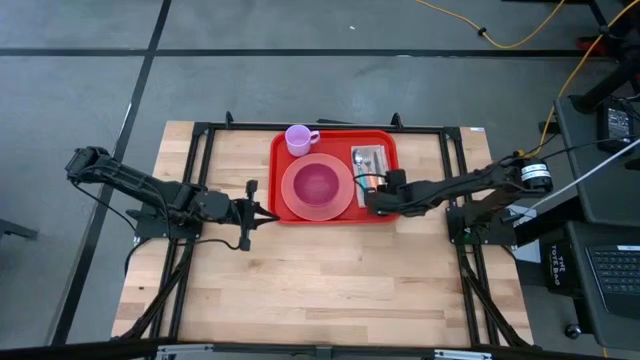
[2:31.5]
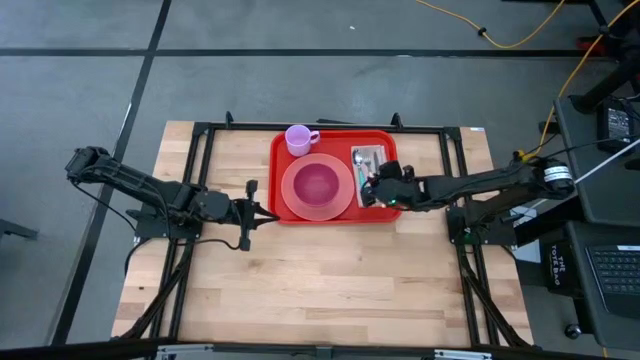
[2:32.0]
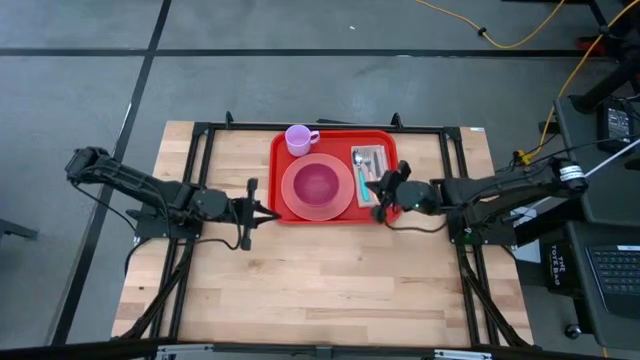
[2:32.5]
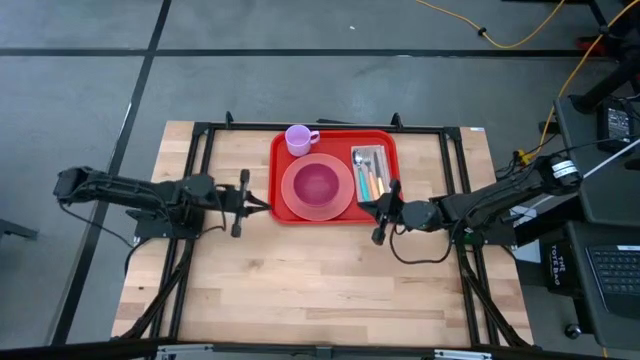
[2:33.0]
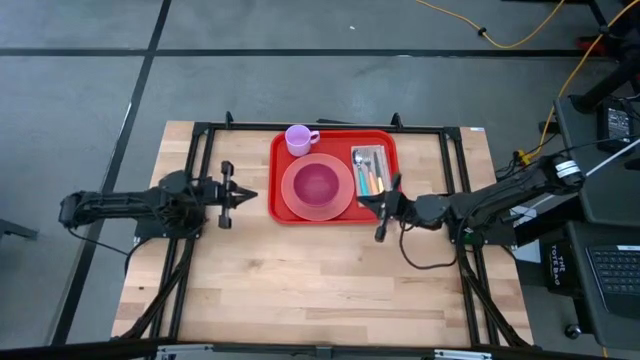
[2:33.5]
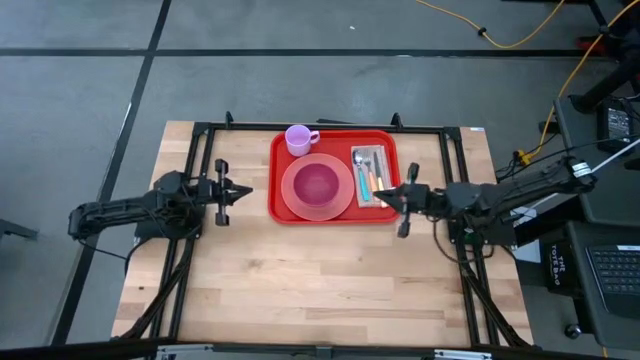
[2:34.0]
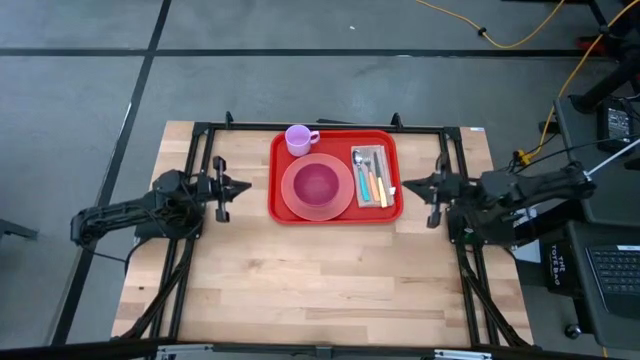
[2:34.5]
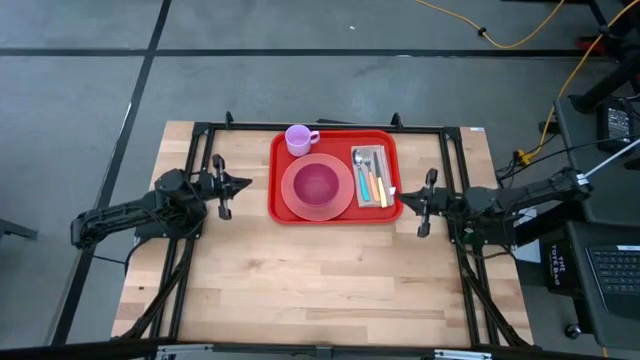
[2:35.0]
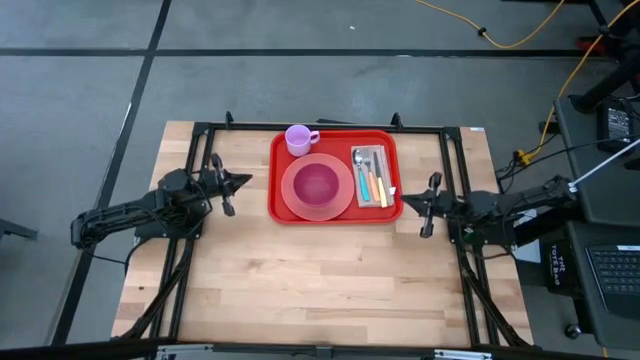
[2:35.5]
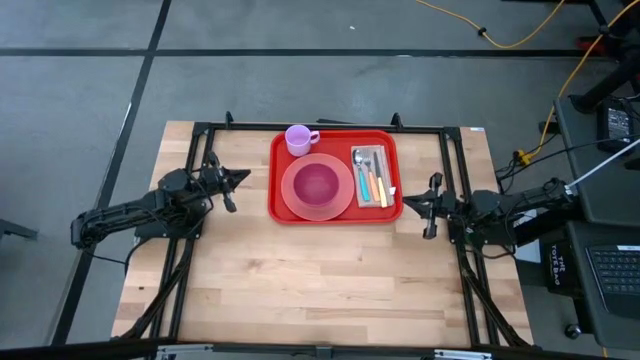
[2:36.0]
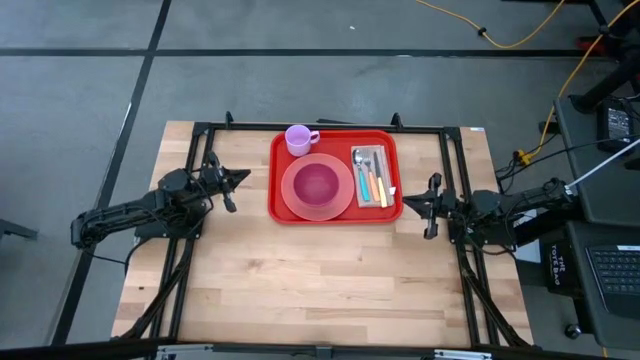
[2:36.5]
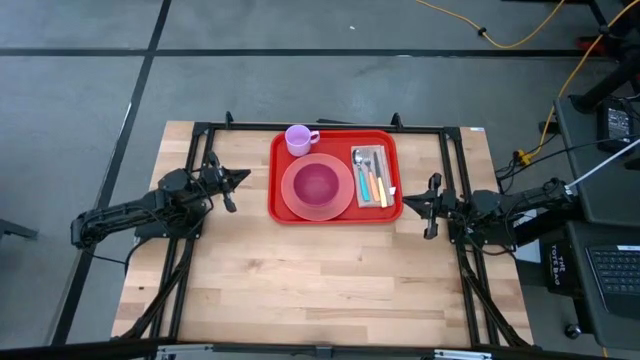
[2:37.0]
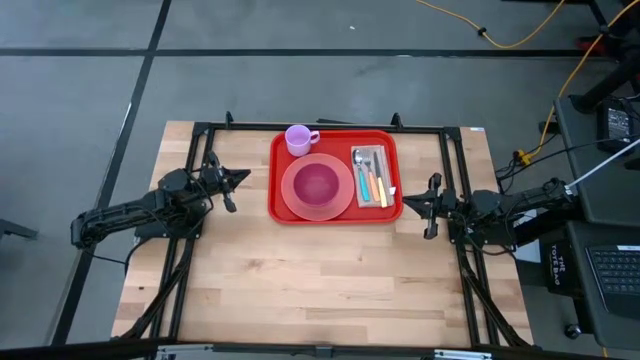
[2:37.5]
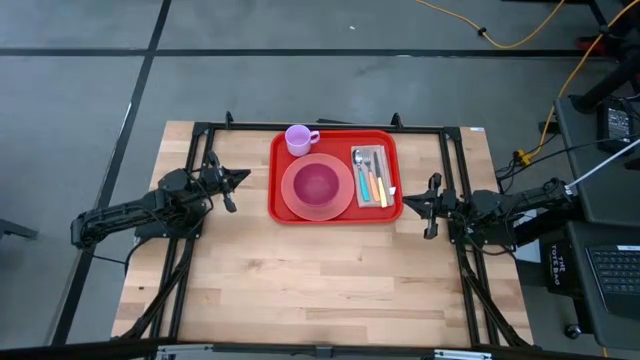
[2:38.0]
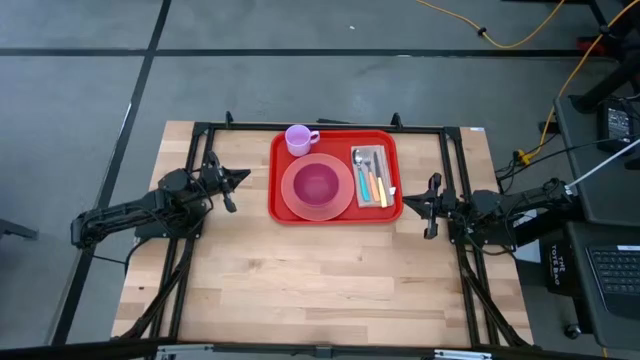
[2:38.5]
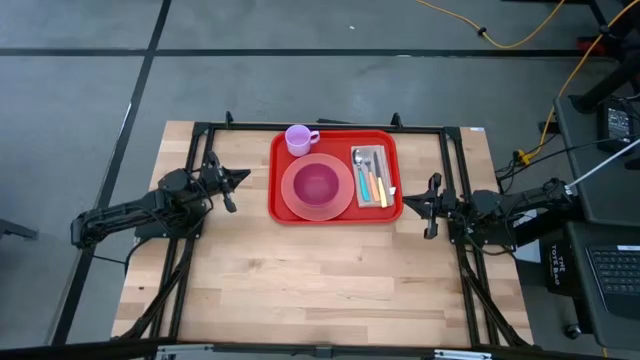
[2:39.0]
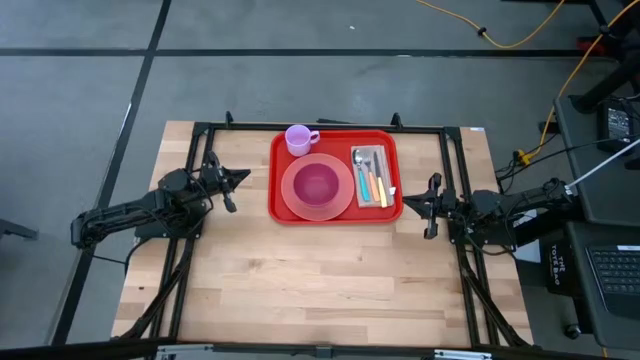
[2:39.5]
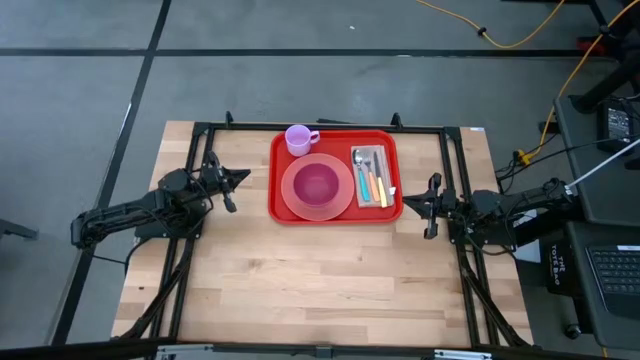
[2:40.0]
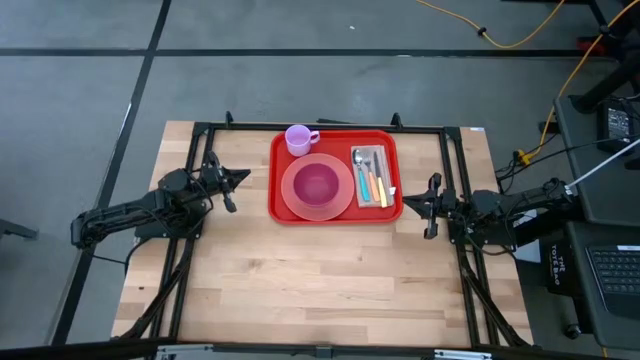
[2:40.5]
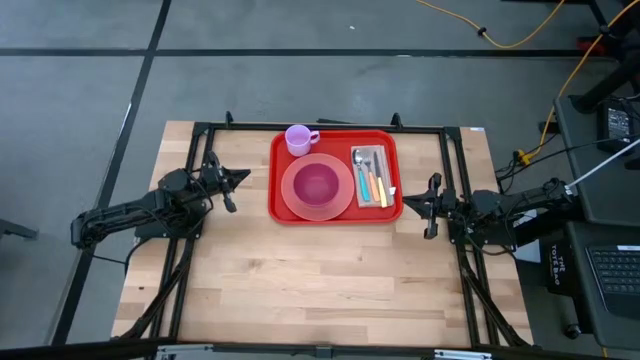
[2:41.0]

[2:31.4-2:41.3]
Task: Set up tray
Return to Home Position

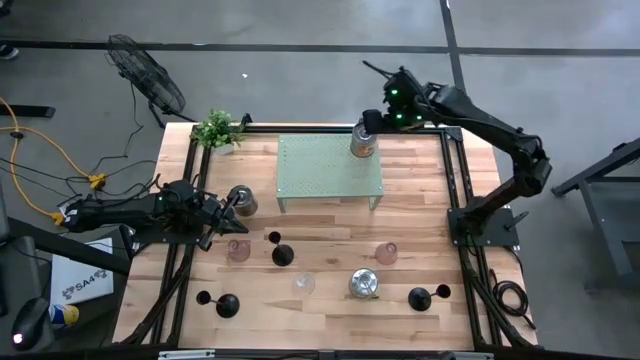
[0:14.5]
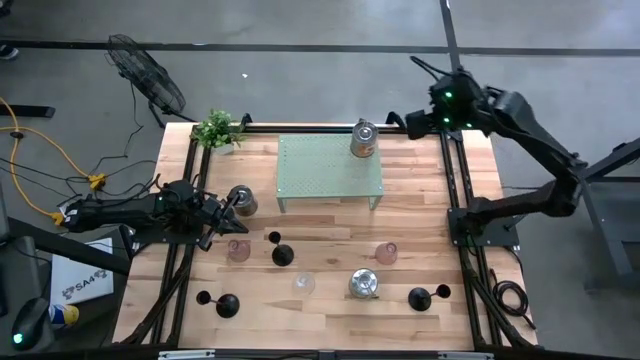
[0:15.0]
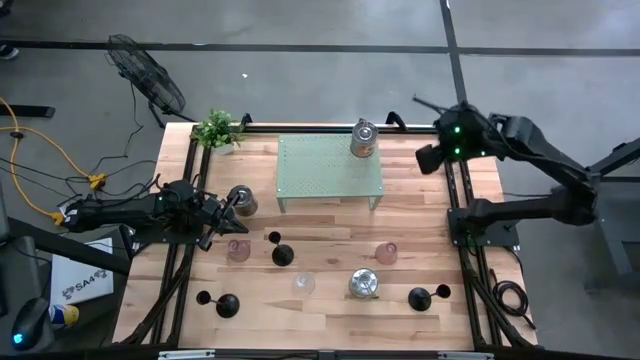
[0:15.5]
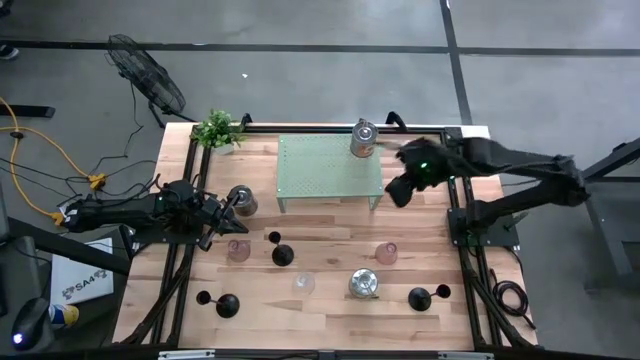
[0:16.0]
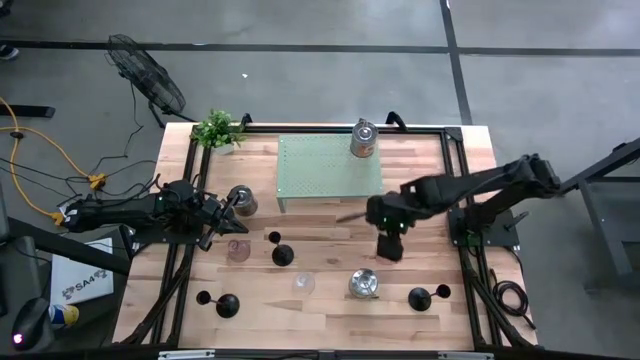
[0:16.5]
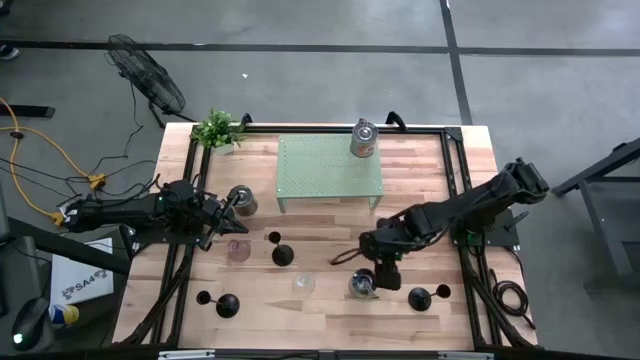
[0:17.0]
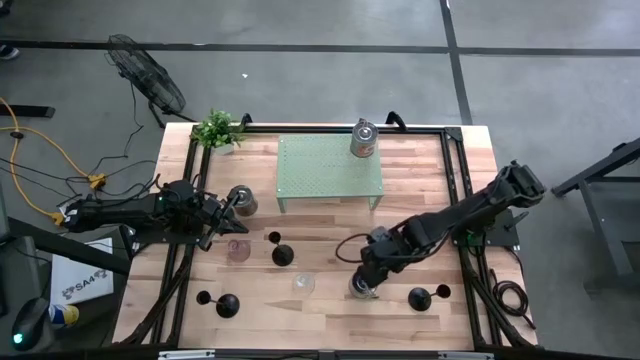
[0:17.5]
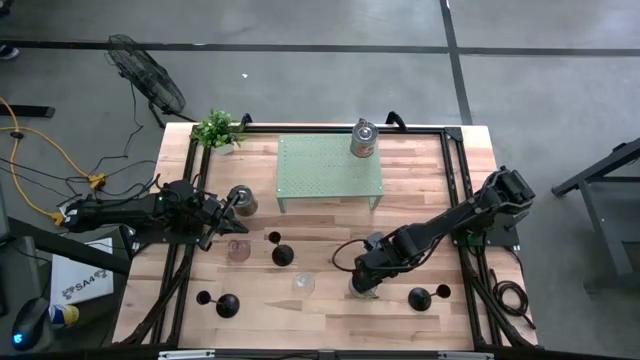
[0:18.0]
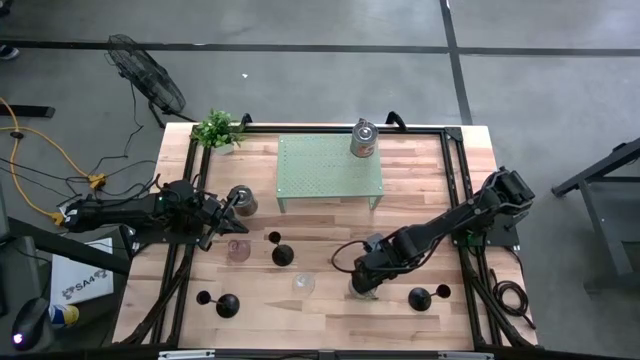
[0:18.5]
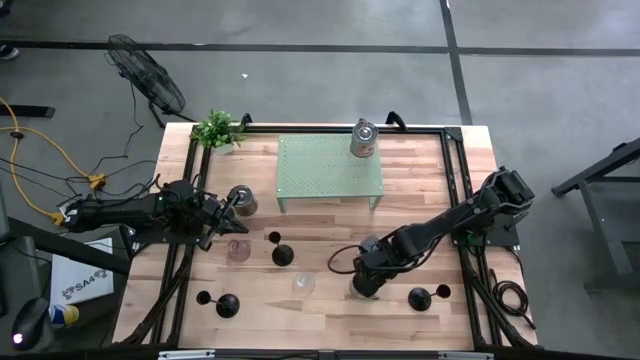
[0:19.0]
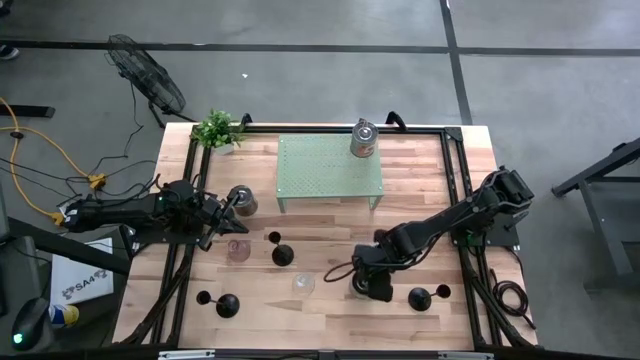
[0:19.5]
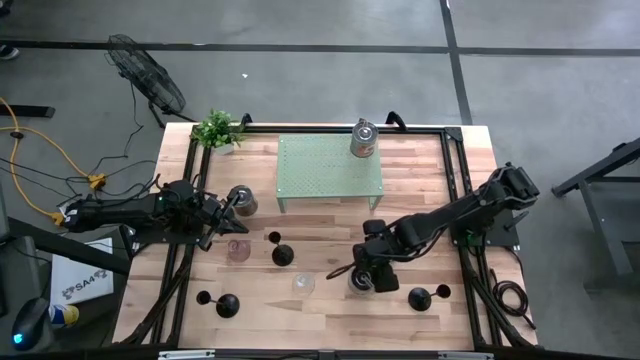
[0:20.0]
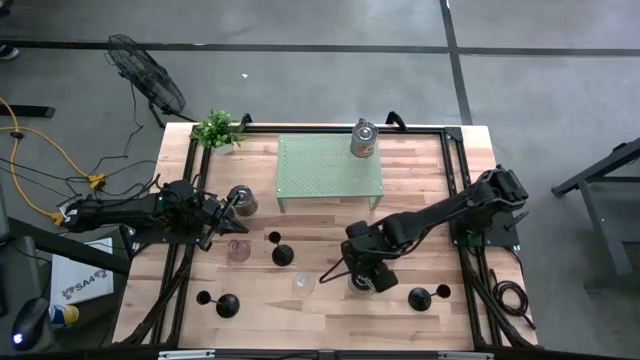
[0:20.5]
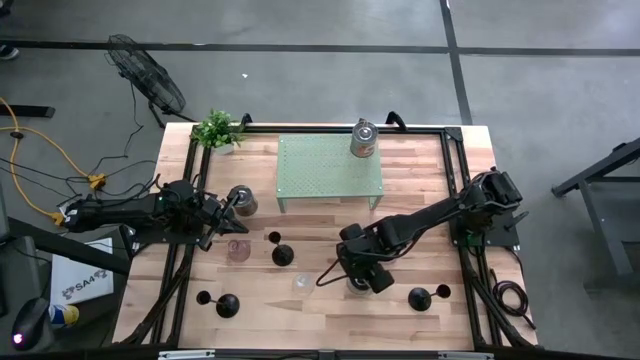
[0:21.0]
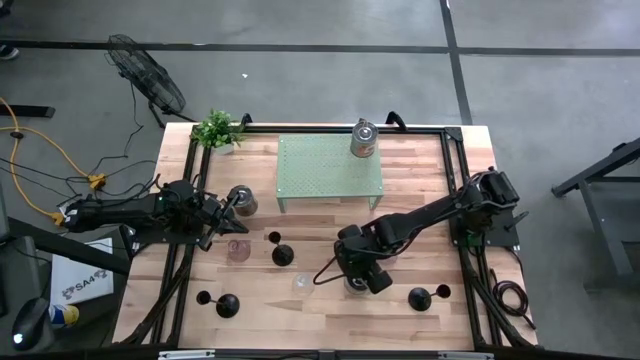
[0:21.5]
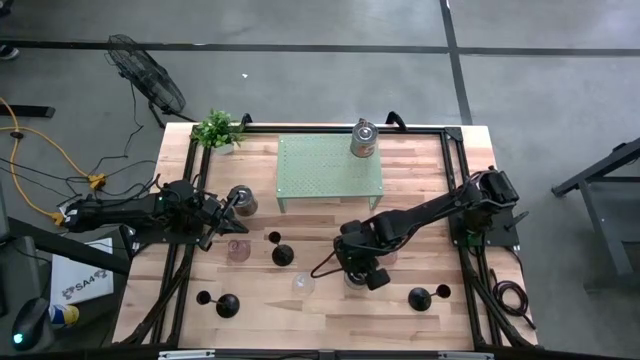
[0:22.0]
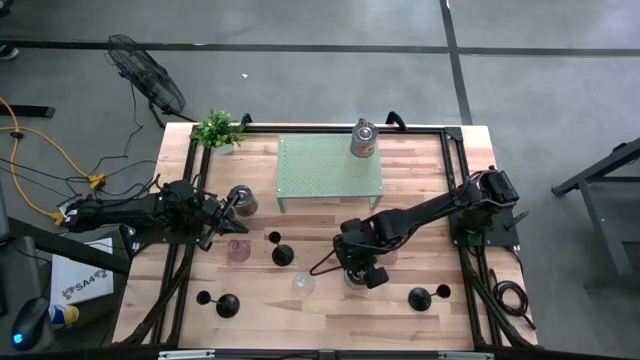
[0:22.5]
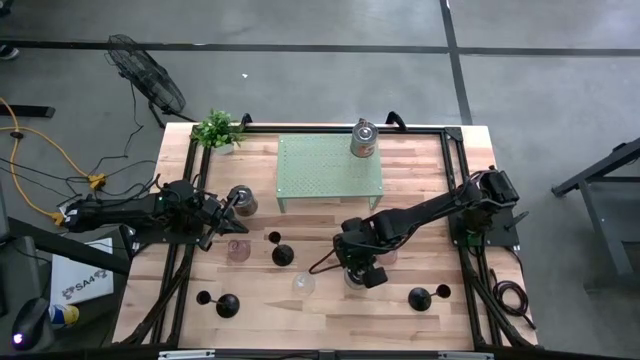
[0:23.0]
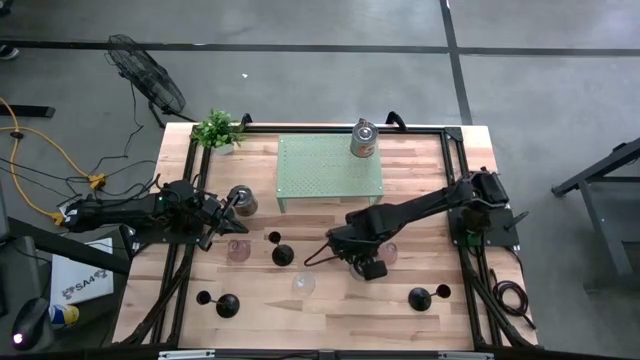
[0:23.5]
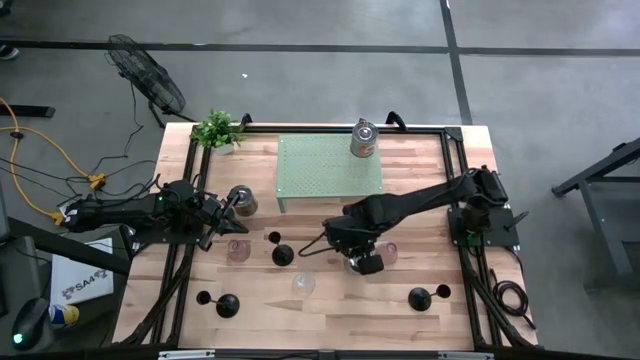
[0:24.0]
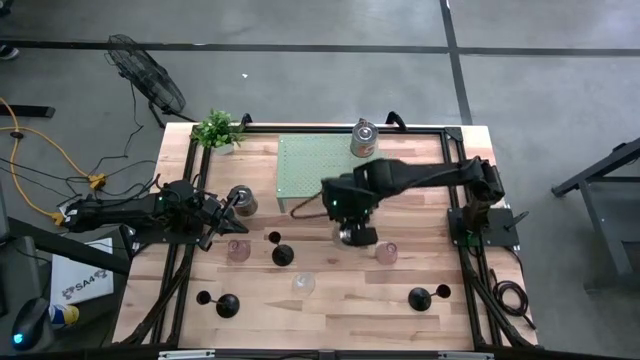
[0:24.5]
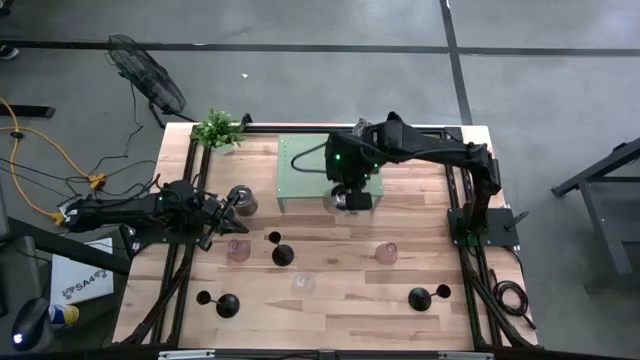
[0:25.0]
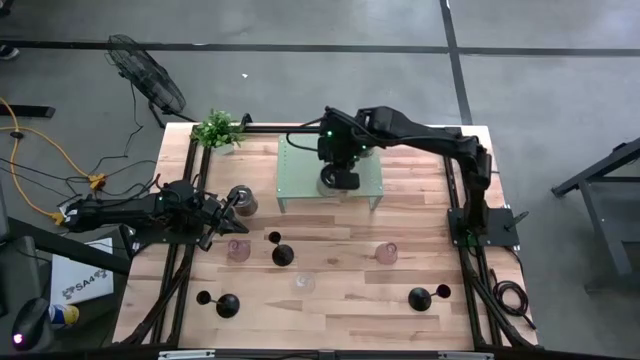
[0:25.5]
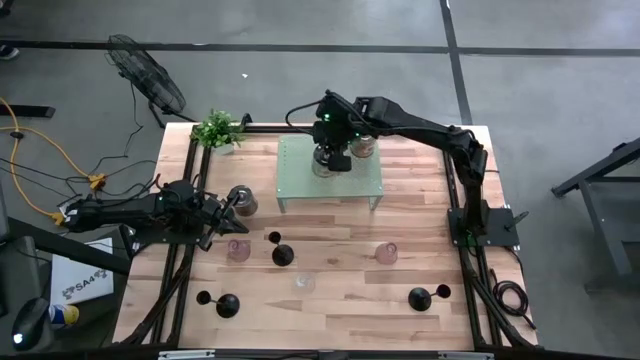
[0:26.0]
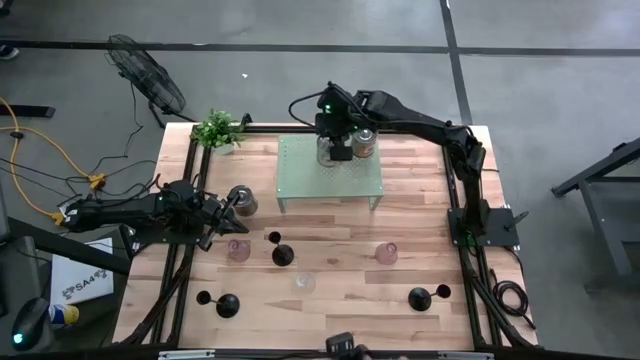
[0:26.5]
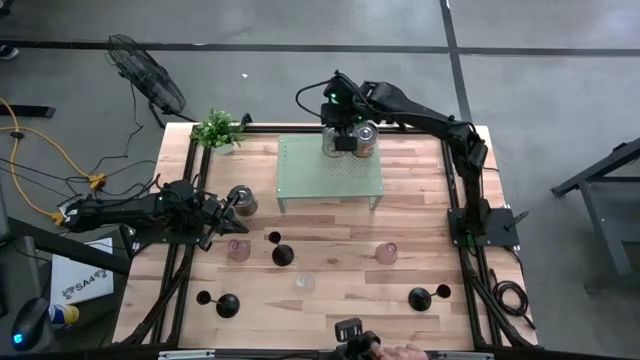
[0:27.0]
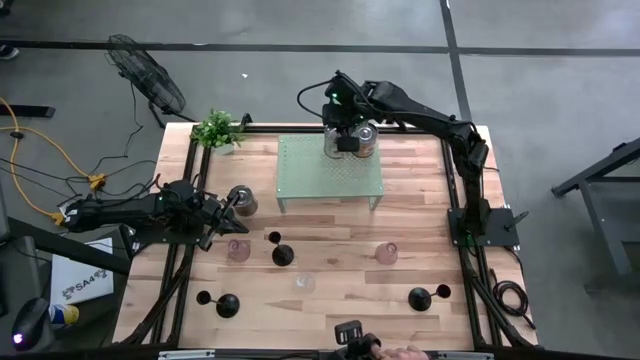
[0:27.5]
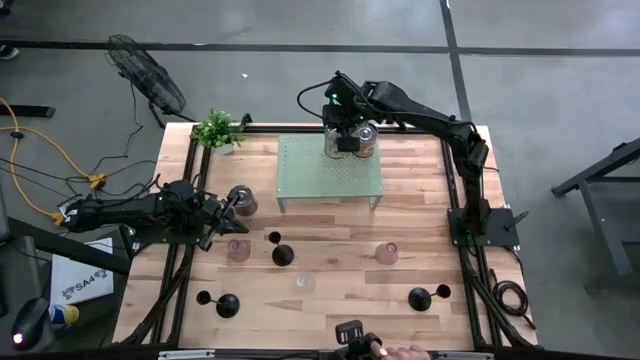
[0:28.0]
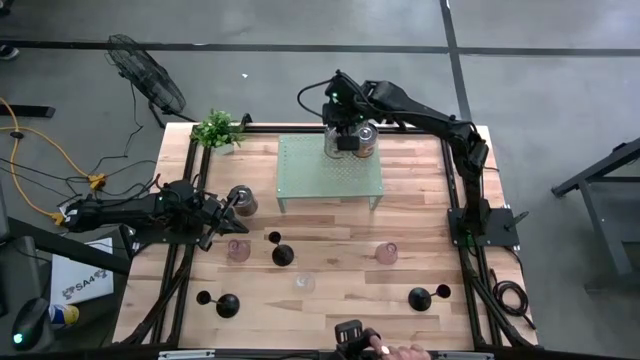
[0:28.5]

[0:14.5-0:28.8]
Task: Pick & Place candle stick holders
Put the bottom silver scented candle on the shelf aligned with the other silver scented candle
